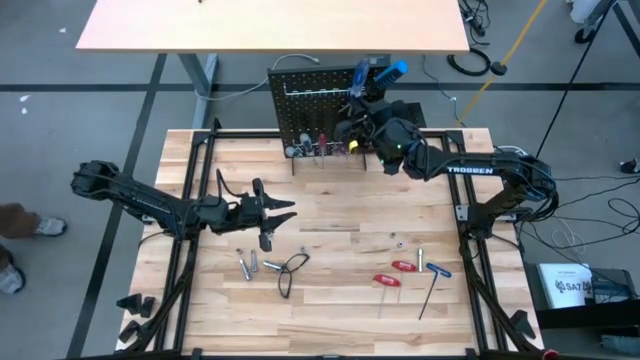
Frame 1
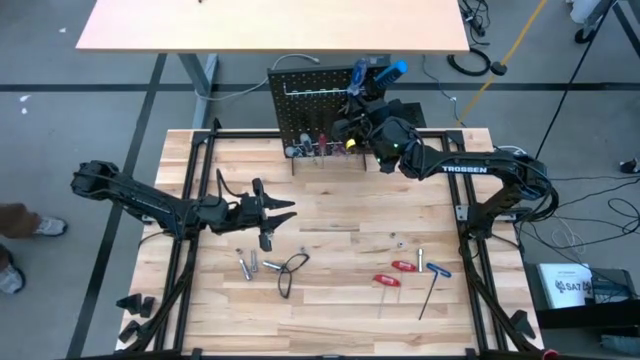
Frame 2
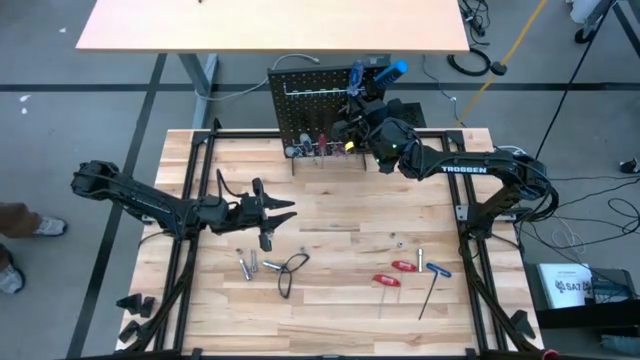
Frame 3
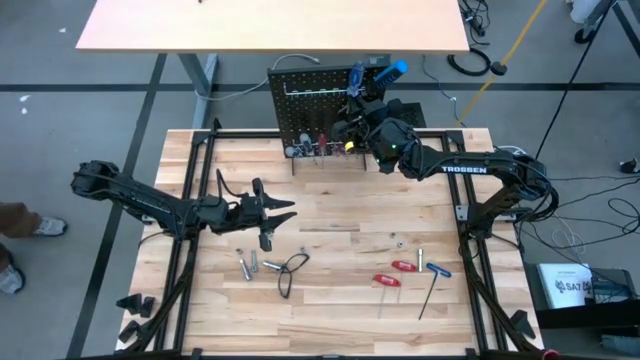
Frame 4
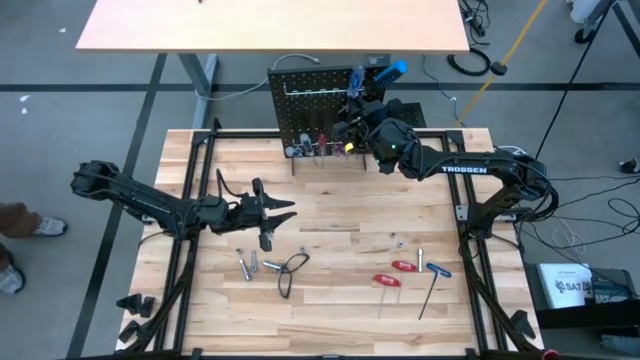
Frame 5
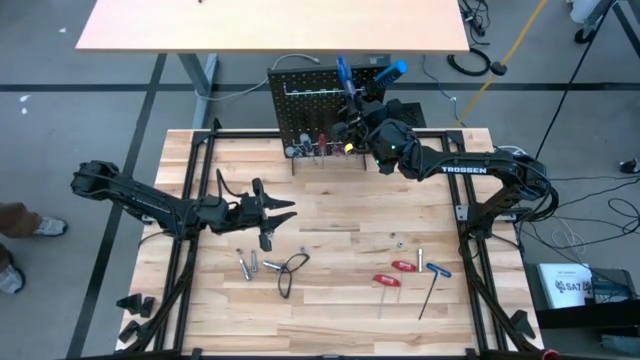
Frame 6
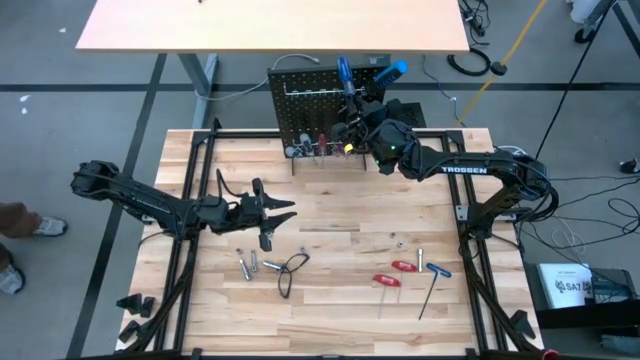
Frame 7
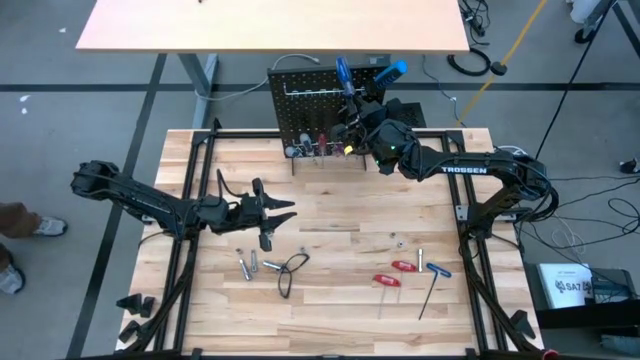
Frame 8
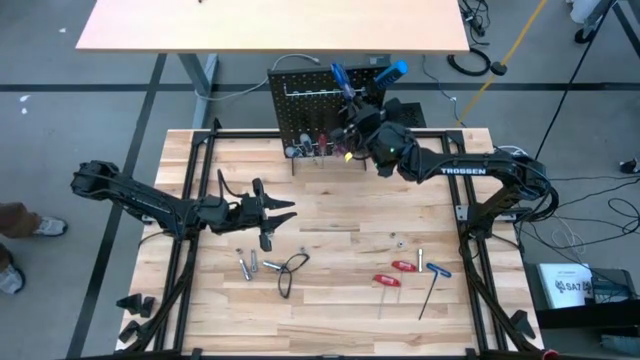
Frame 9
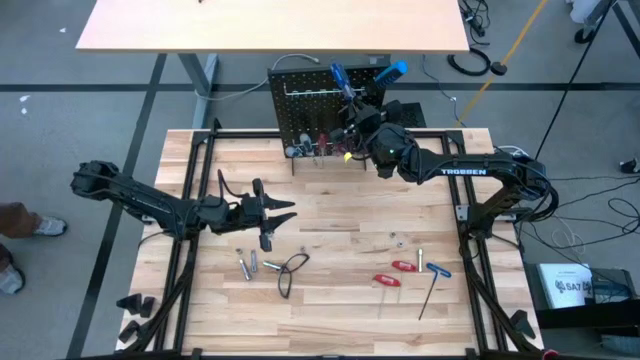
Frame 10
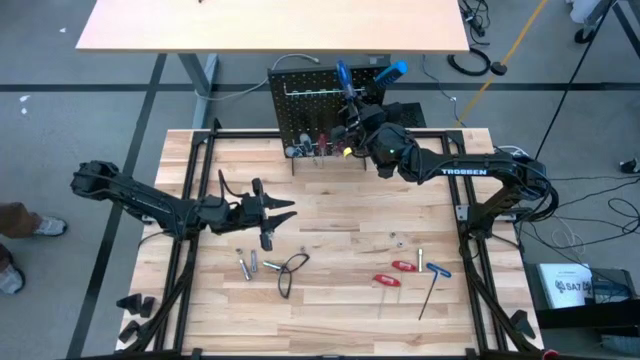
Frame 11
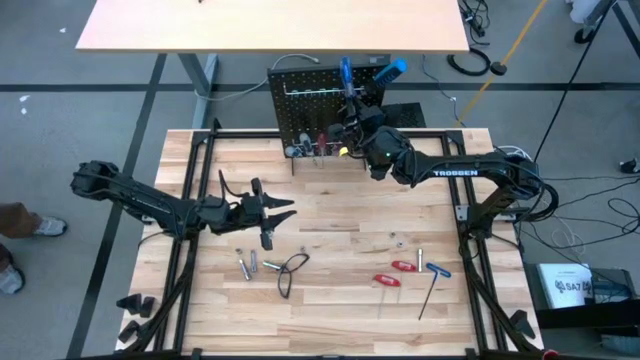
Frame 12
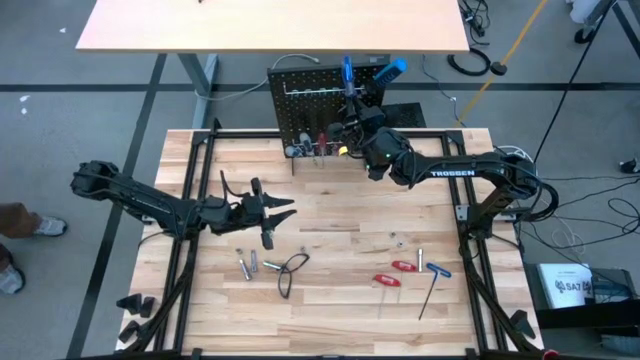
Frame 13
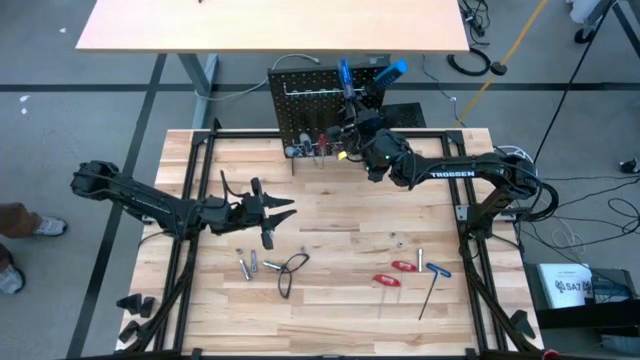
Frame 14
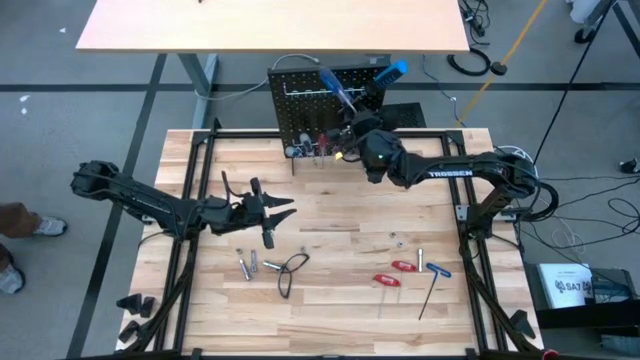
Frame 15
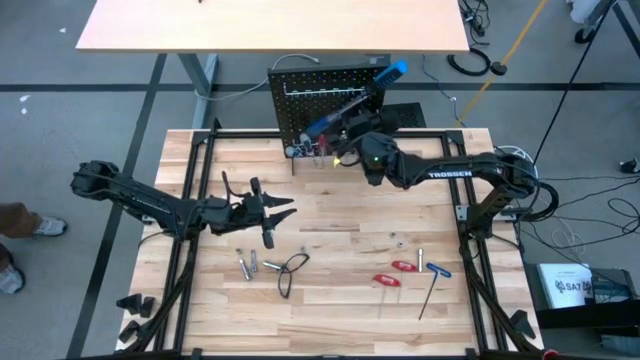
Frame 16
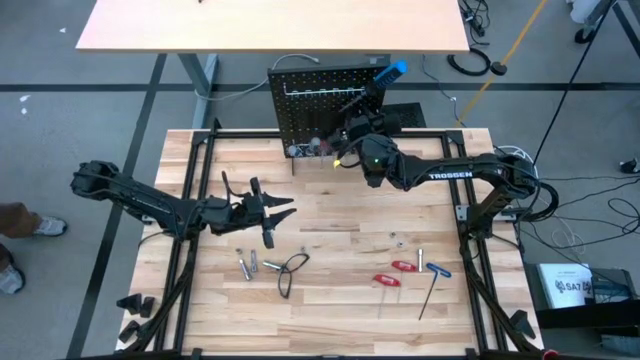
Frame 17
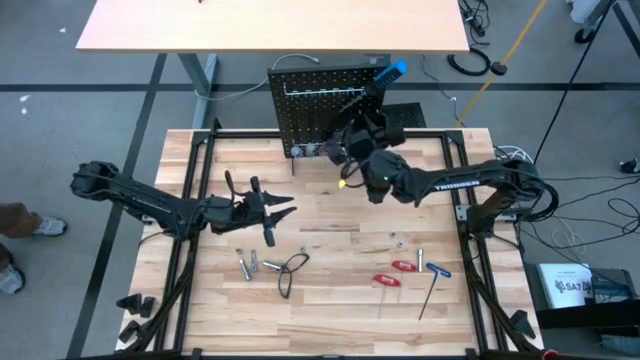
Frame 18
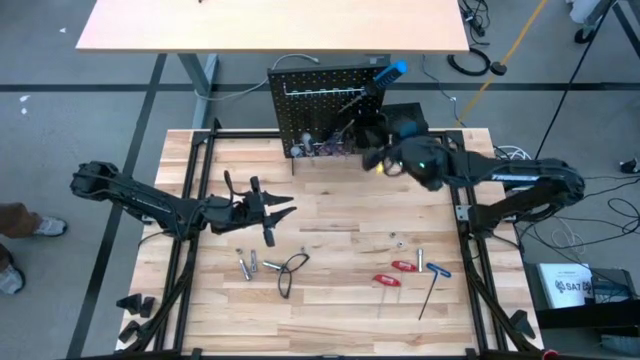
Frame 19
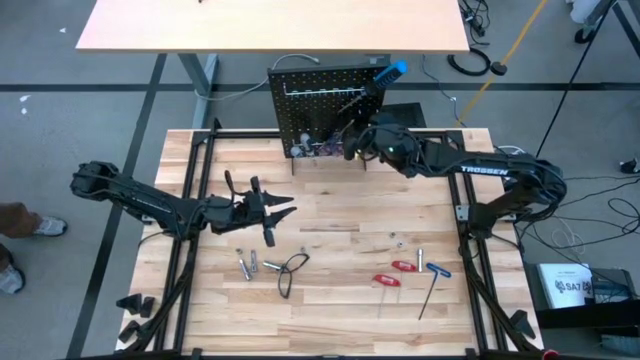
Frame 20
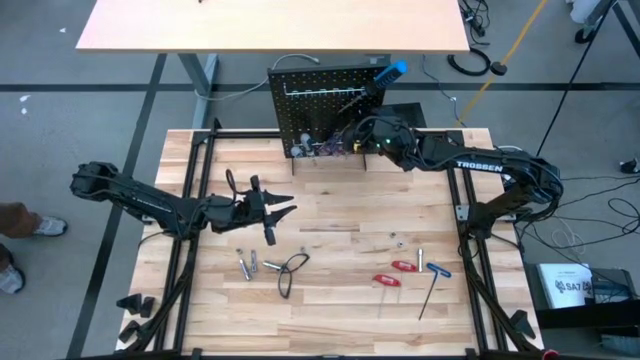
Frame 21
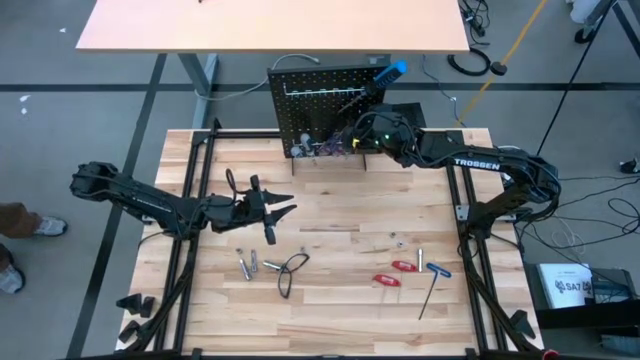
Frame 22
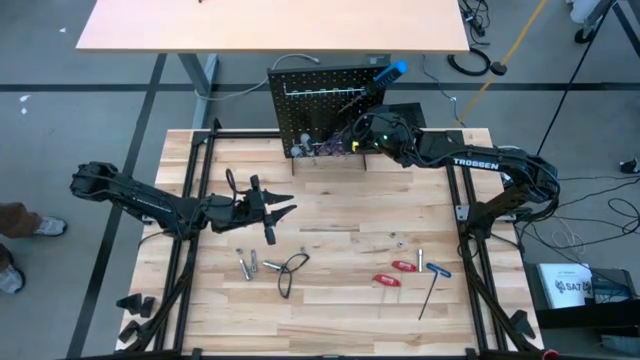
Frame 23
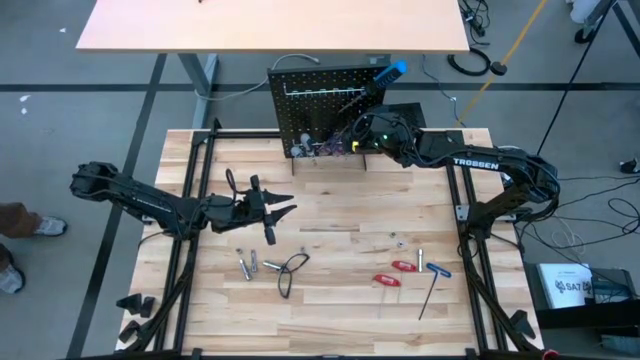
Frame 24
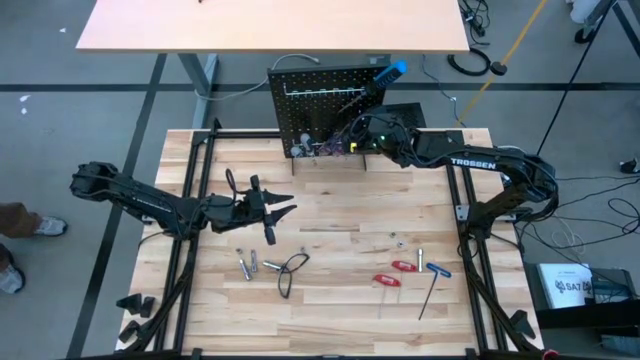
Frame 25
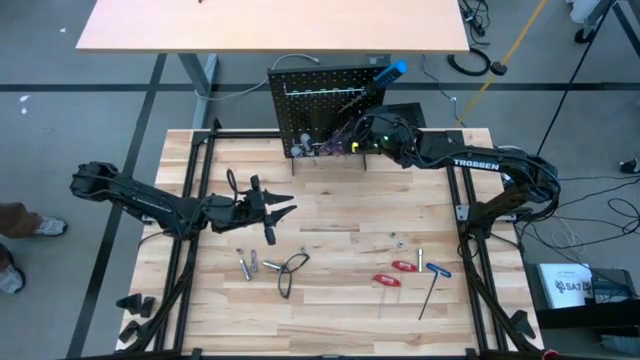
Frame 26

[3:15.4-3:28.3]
Task: Hang tools onto peg board
Hang the blue screwdriver on the peg board

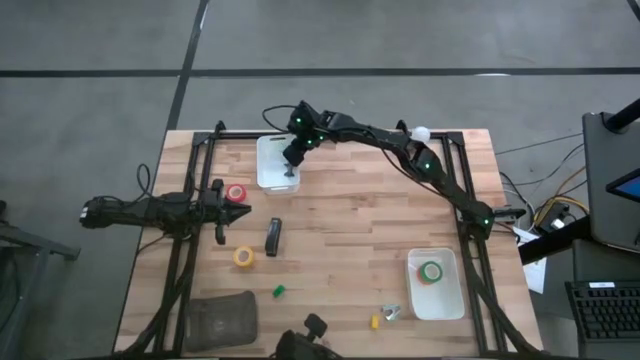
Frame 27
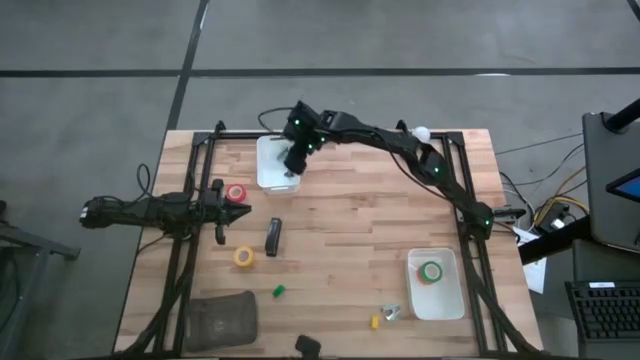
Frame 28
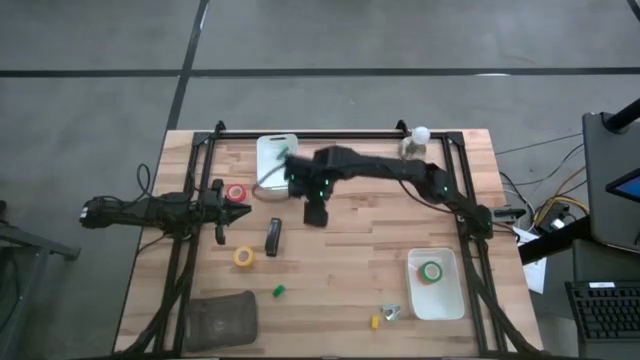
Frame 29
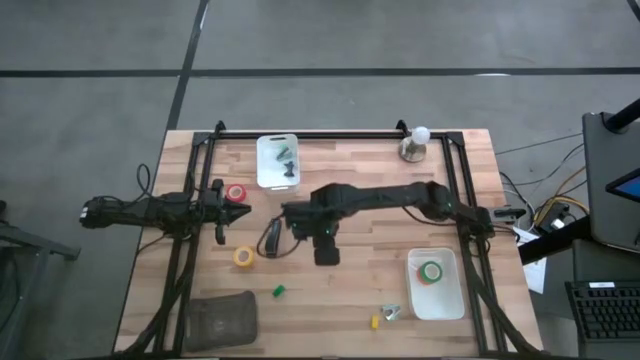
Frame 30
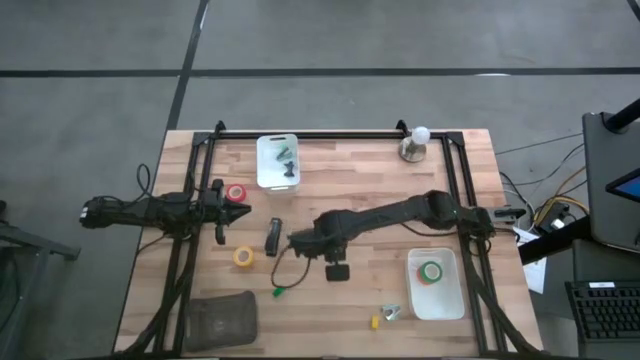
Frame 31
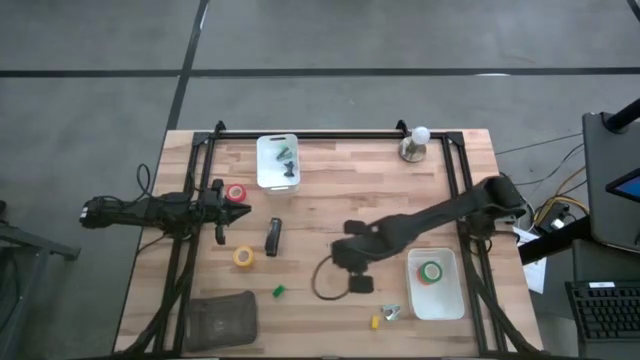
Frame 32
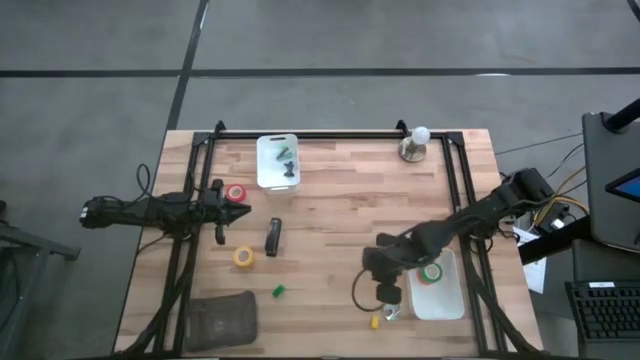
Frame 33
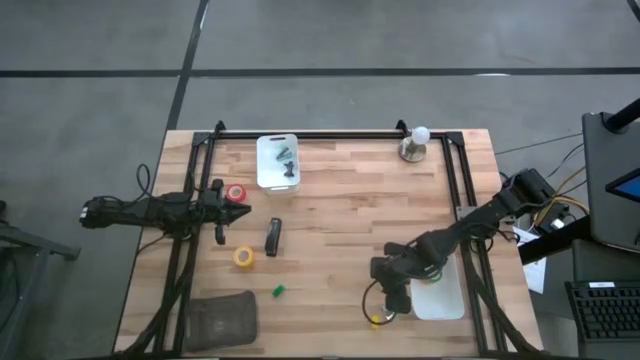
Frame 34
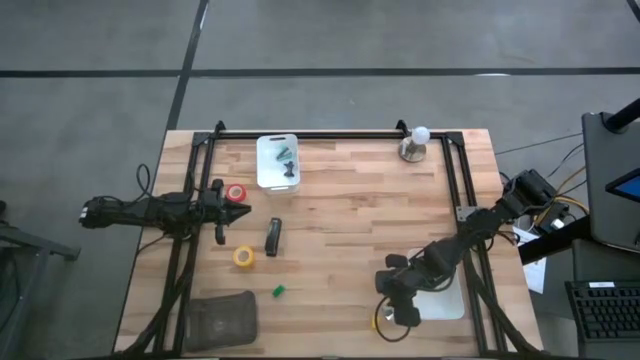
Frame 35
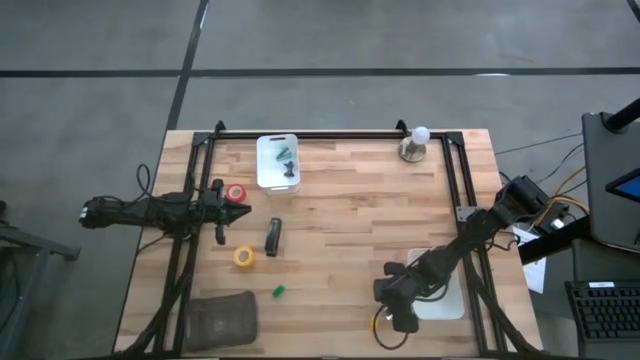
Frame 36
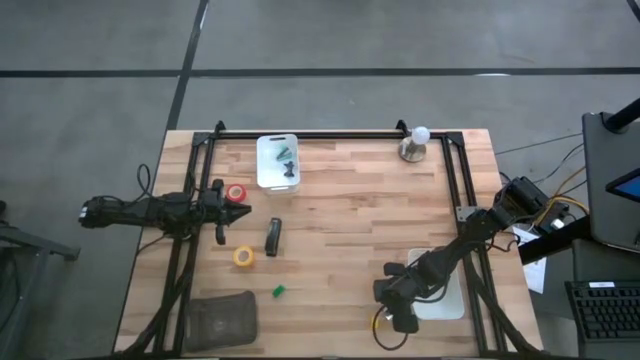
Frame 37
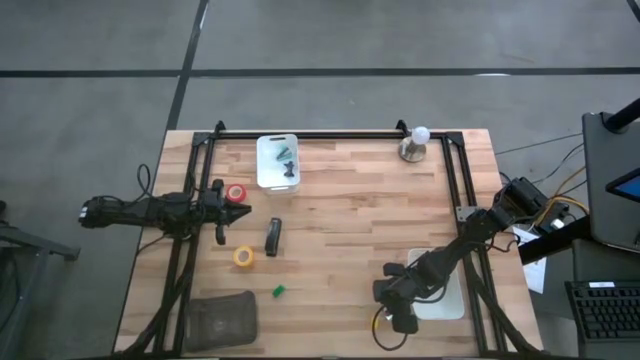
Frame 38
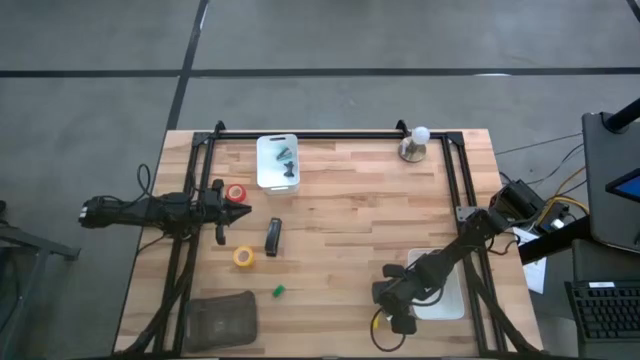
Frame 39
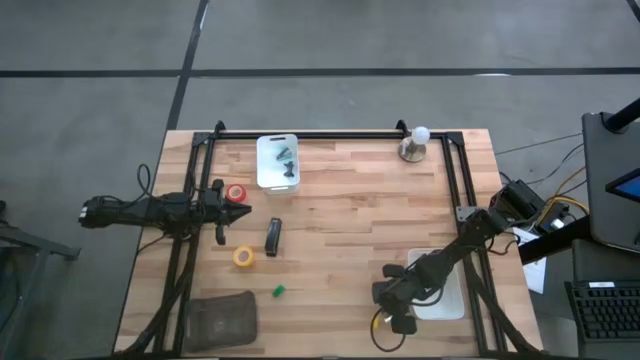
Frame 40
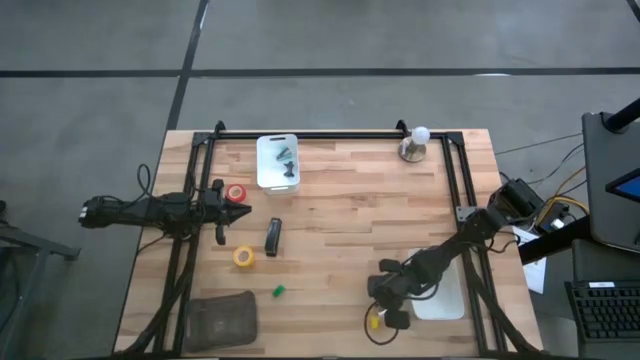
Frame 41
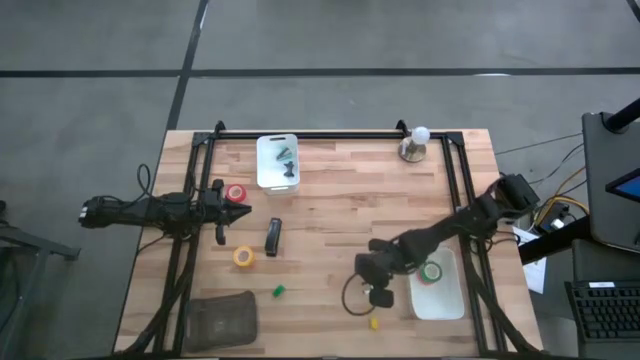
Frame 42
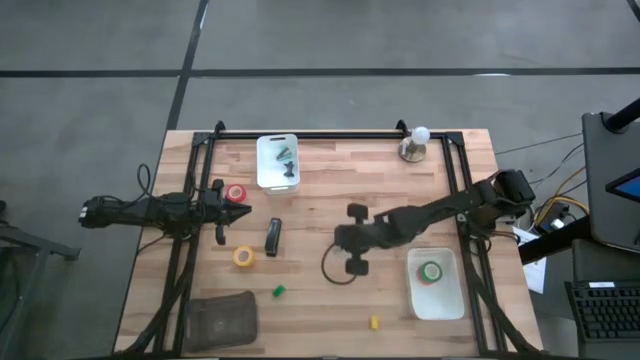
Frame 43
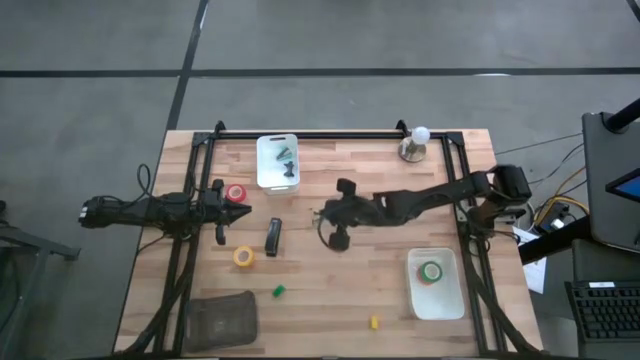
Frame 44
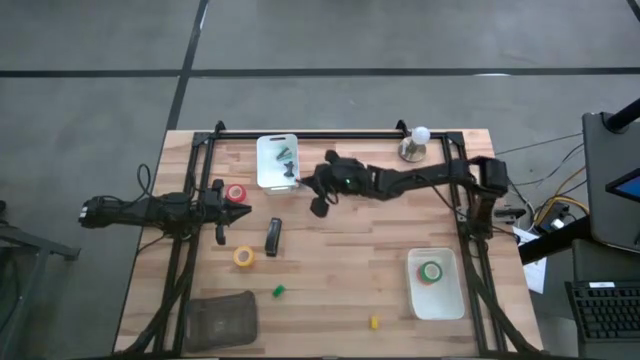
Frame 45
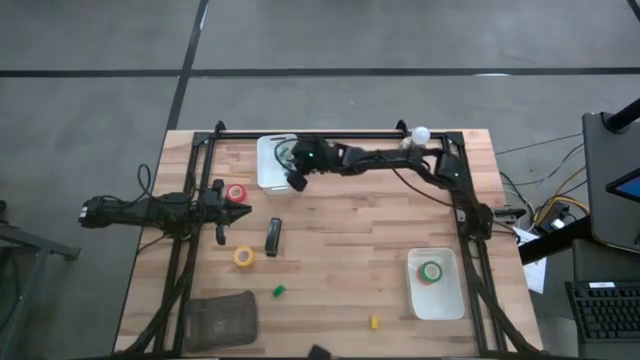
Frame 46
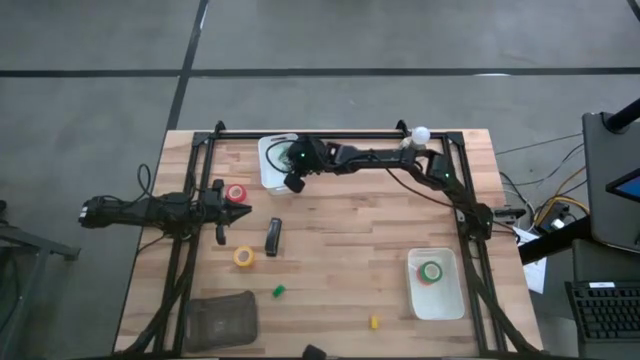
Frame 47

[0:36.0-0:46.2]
Task: Pick and place Stapler, Stapler remover, tape
Put the blue staple remover into the top white bin
